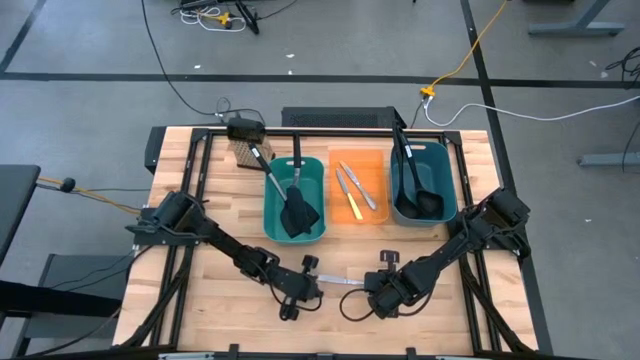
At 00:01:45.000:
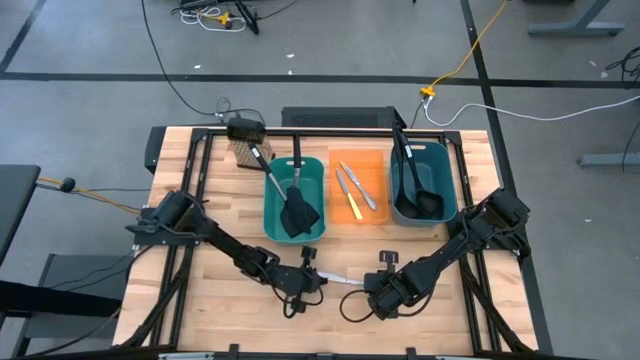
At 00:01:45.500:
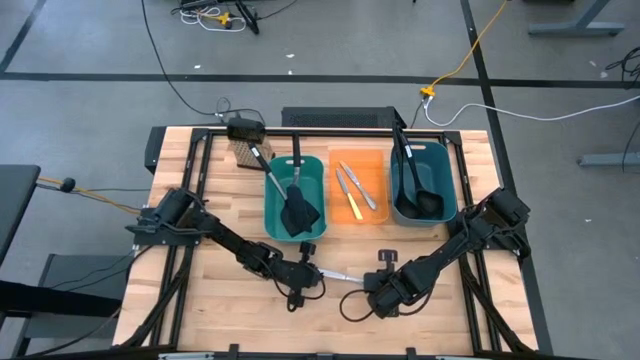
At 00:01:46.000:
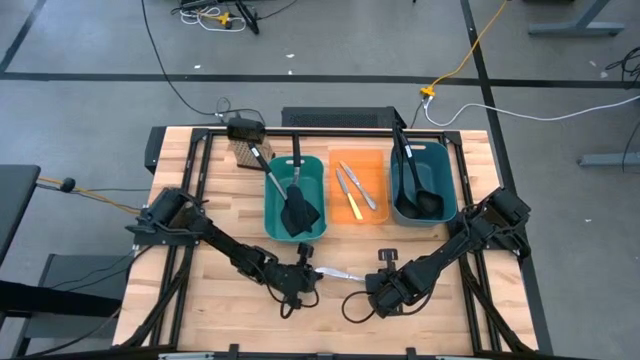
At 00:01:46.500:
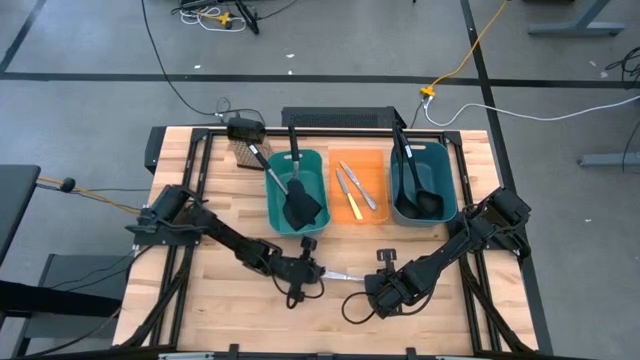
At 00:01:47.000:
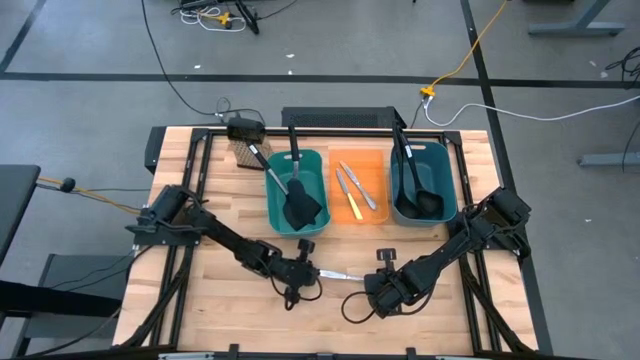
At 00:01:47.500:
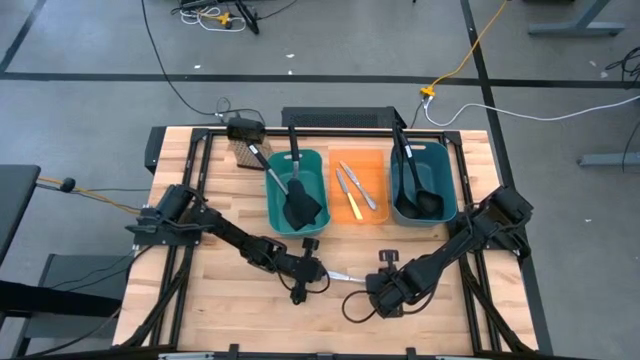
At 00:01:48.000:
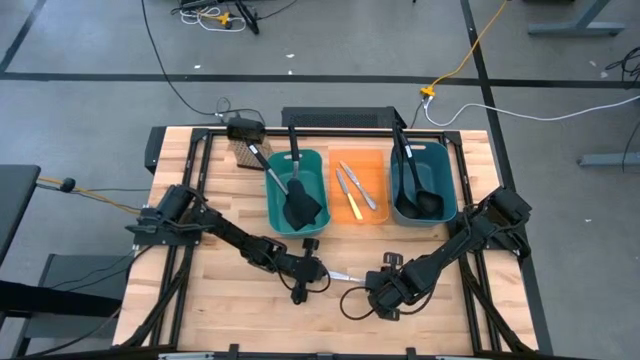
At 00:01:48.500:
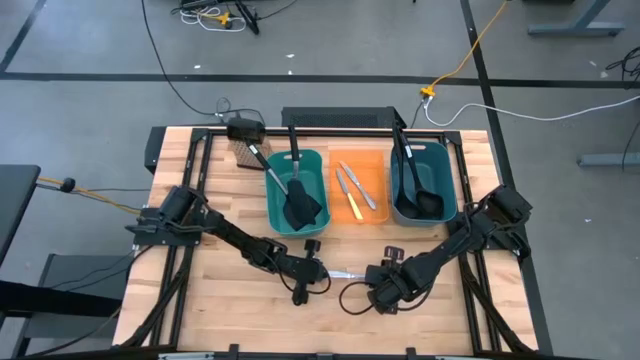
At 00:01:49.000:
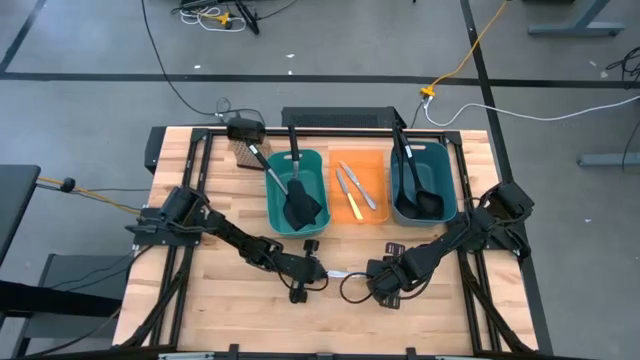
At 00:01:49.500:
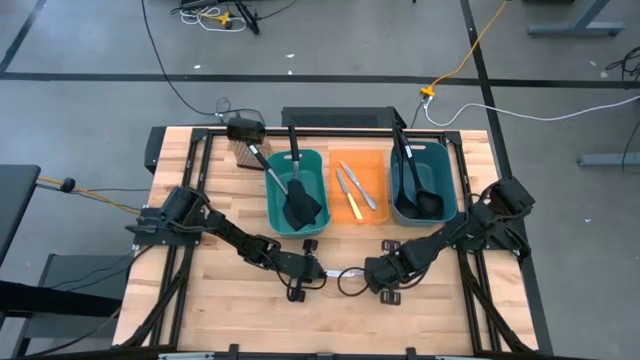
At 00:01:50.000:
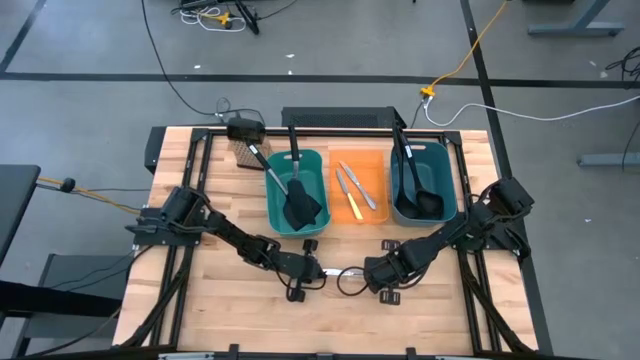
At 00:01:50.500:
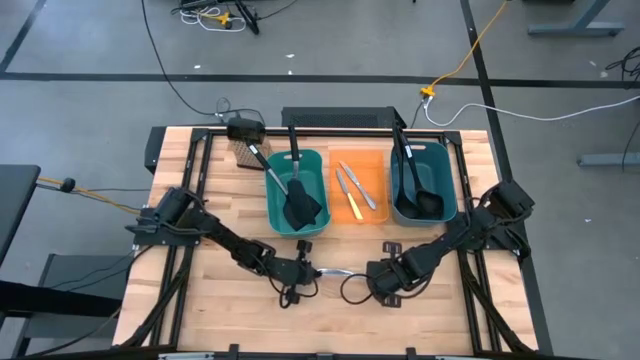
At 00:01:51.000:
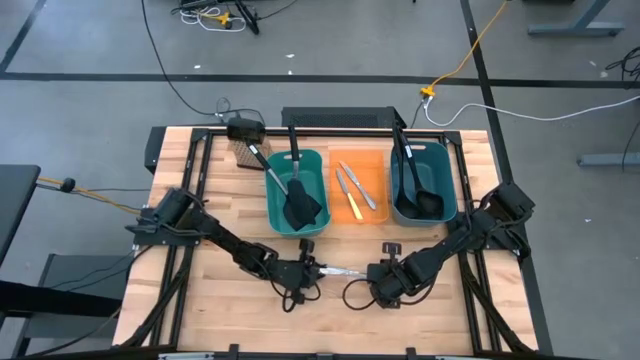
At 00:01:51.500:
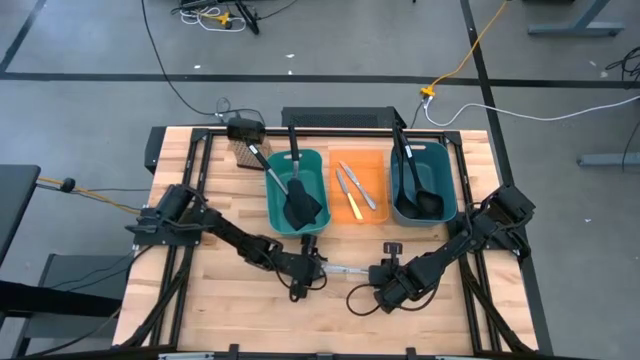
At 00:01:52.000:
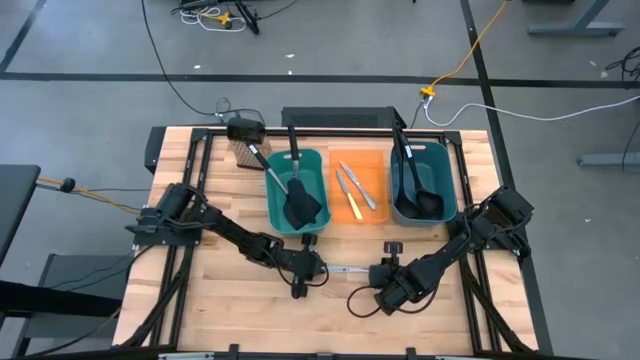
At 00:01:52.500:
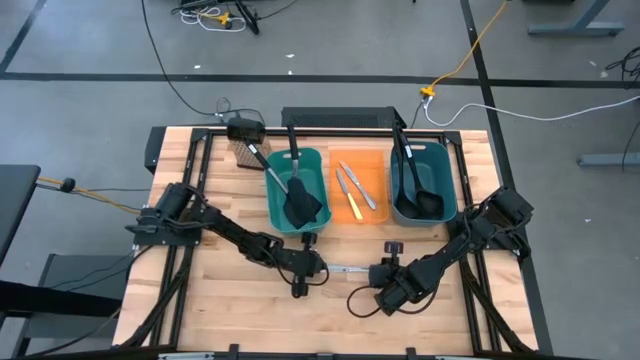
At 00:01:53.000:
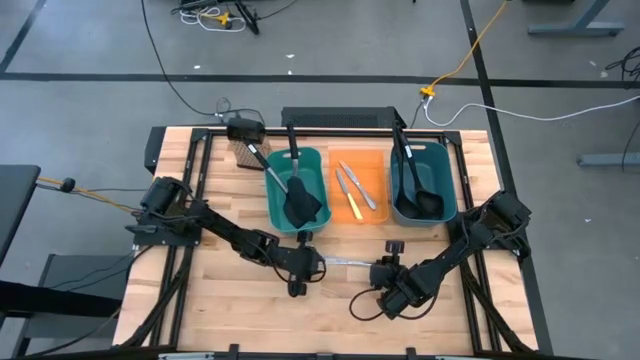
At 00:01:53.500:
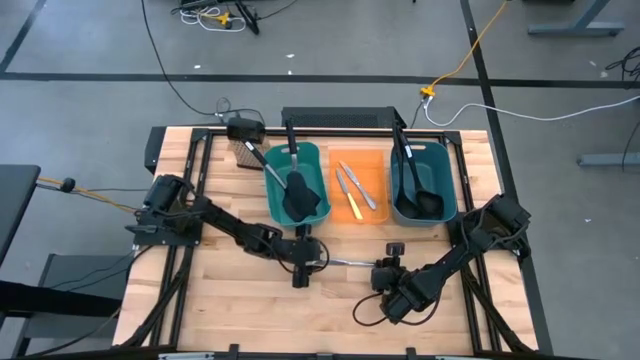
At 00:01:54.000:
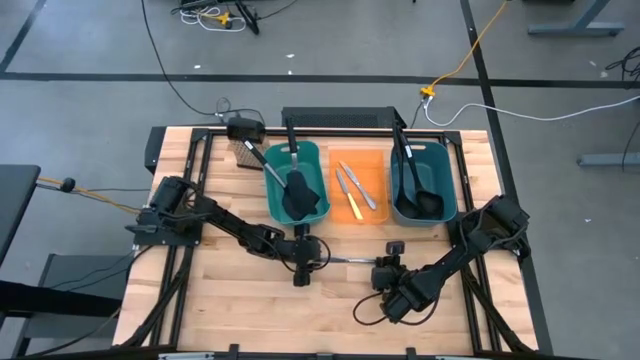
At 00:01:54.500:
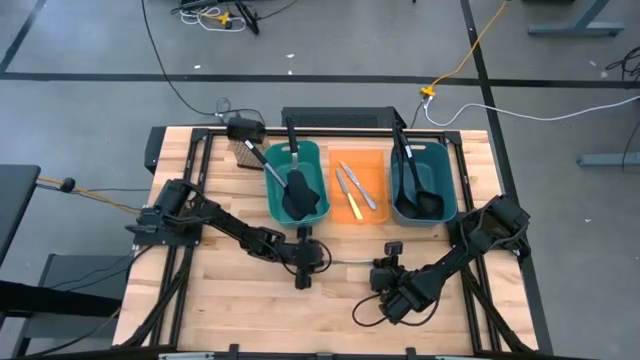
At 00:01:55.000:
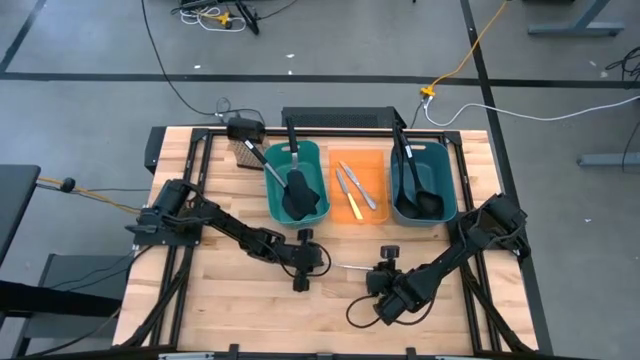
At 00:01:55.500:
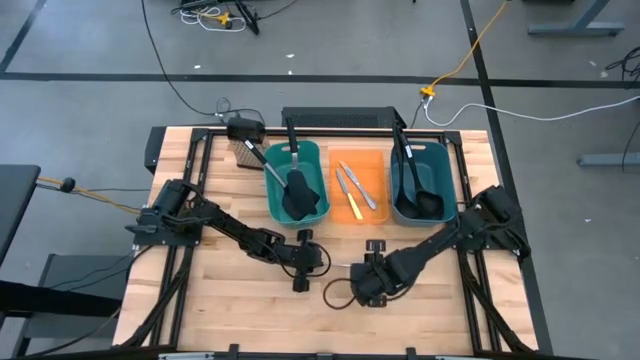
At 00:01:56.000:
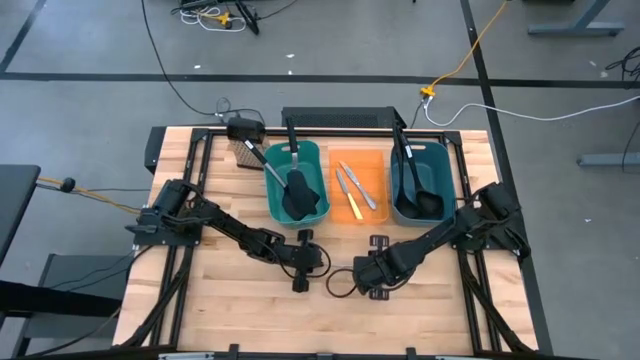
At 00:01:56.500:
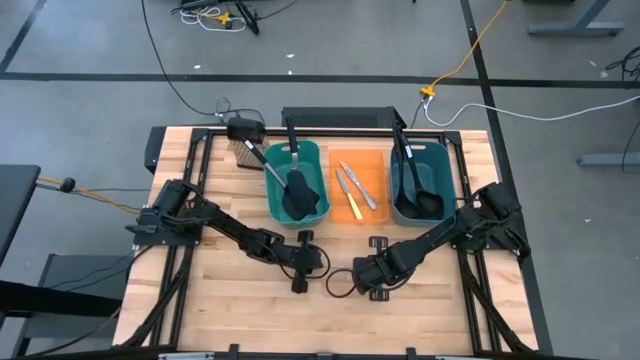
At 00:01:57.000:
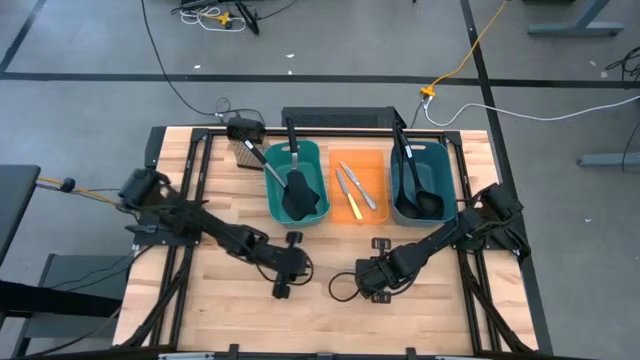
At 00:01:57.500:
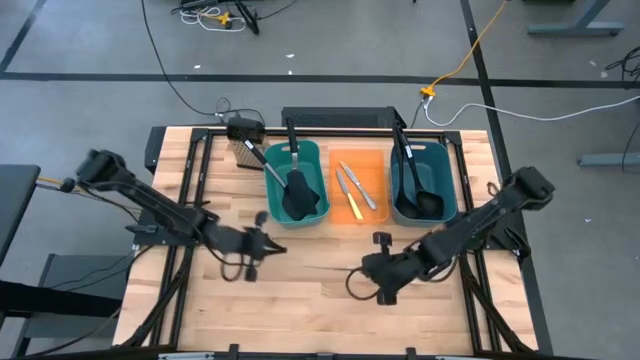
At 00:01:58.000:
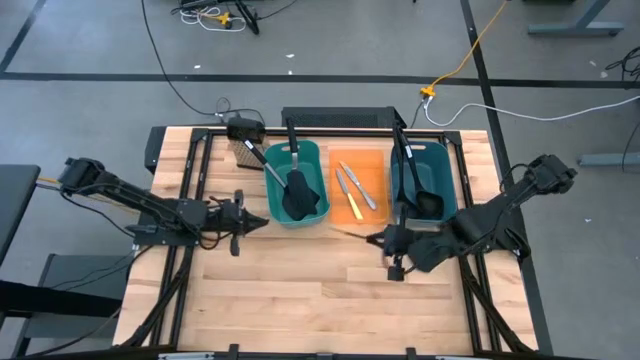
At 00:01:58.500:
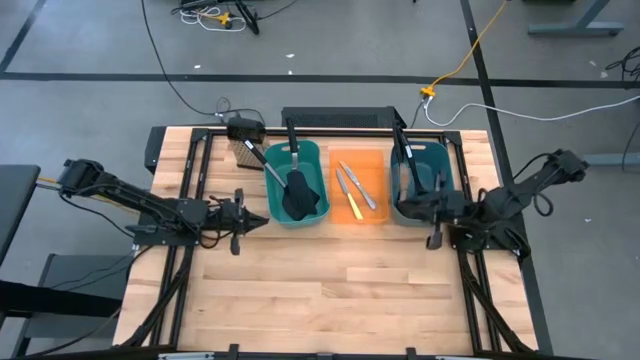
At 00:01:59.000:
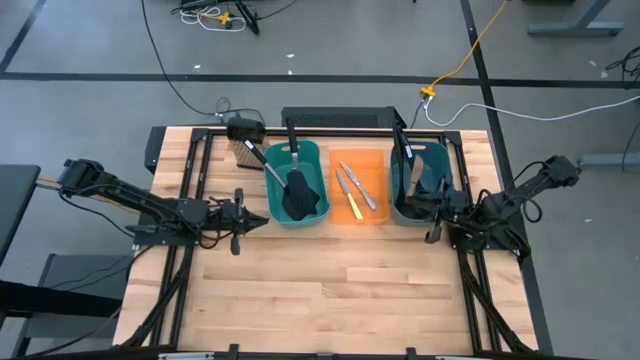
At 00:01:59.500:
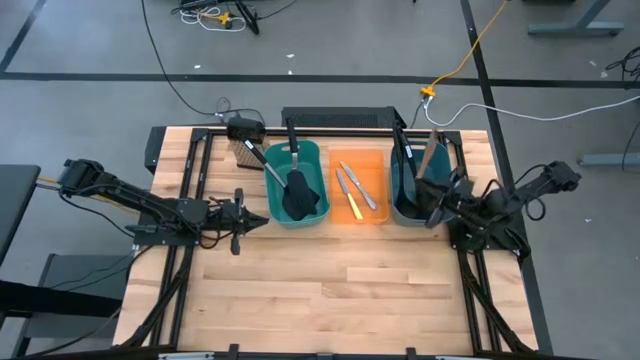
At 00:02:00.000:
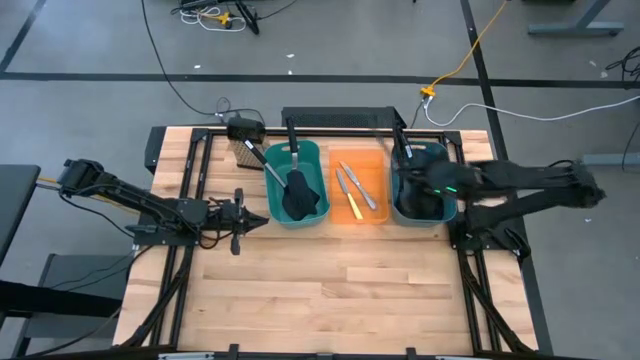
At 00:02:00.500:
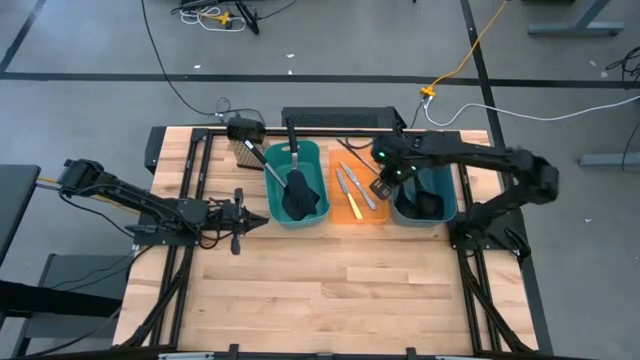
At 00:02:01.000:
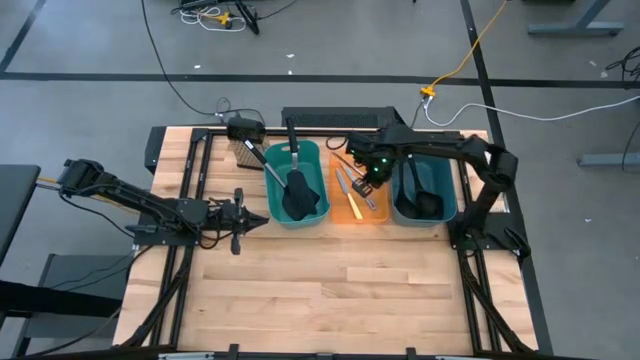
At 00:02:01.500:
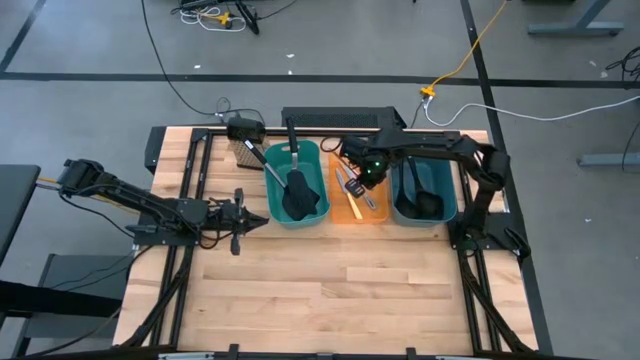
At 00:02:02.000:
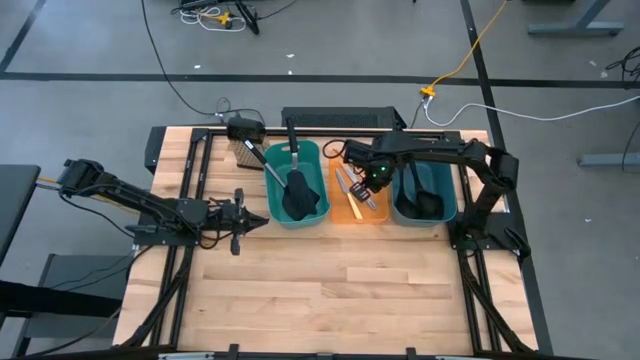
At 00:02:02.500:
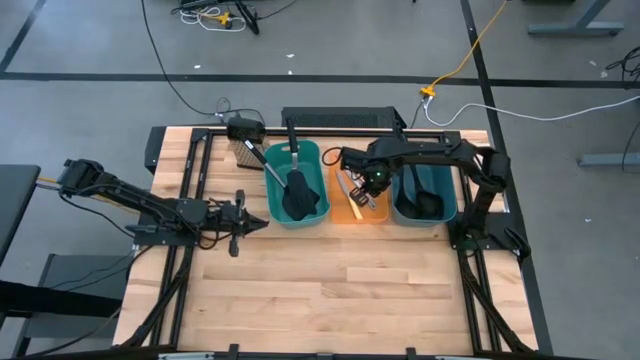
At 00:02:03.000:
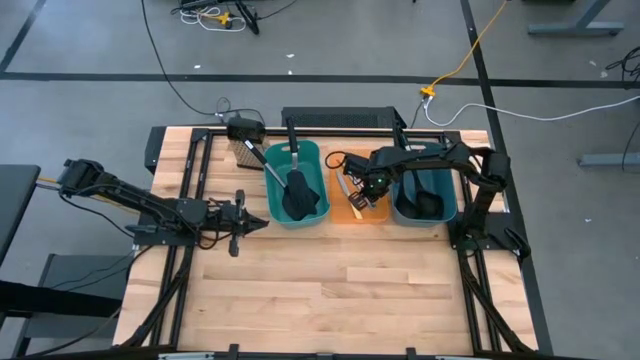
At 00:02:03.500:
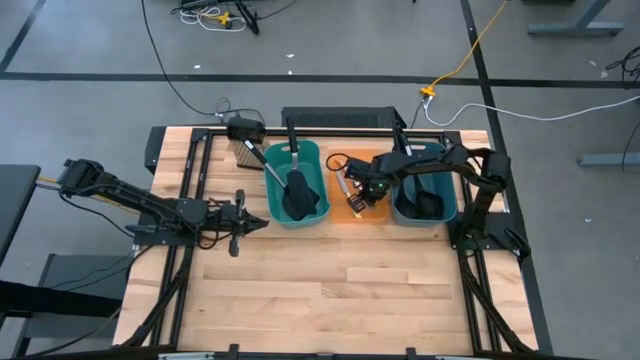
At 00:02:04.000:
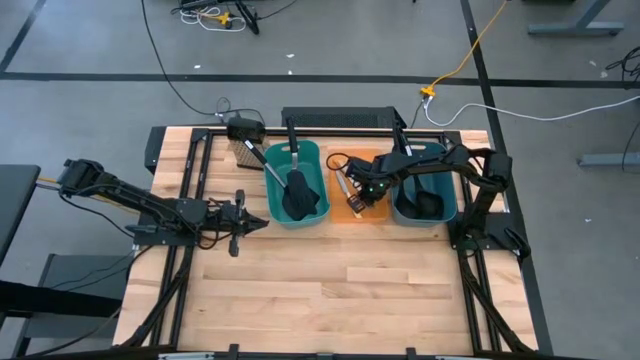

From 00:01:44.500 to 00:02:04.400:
Task: Pick & Place Kitchen Items
Put the silver table knife into the orange bin

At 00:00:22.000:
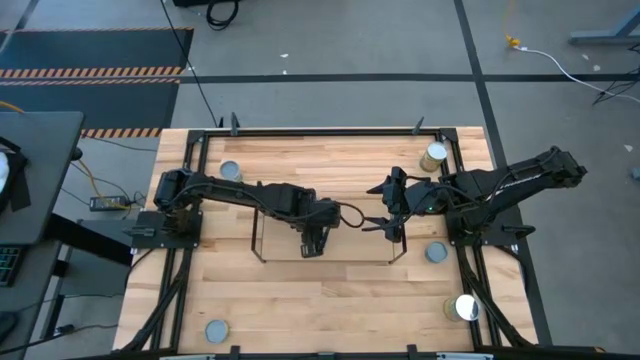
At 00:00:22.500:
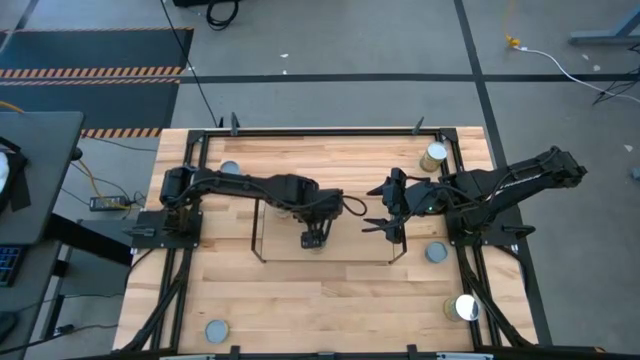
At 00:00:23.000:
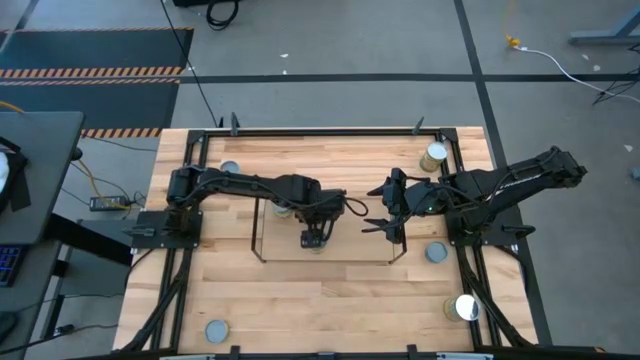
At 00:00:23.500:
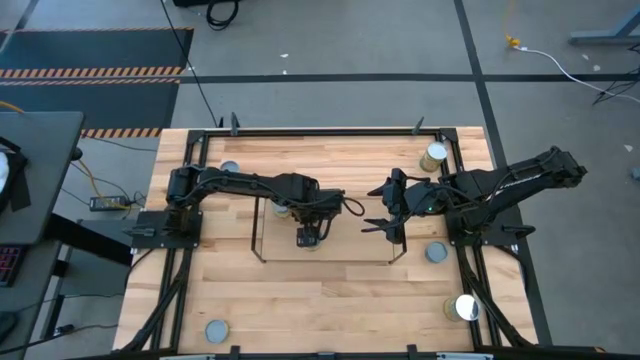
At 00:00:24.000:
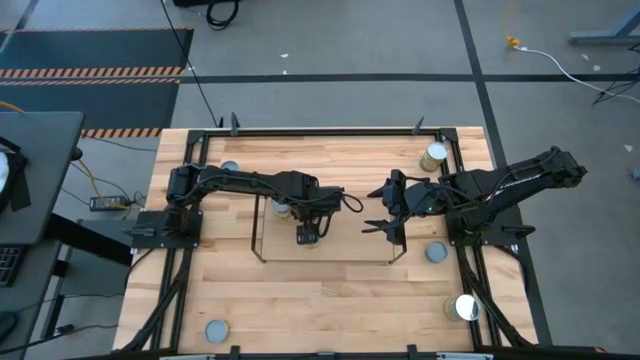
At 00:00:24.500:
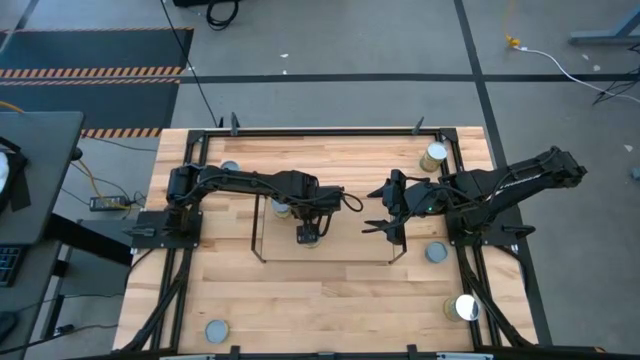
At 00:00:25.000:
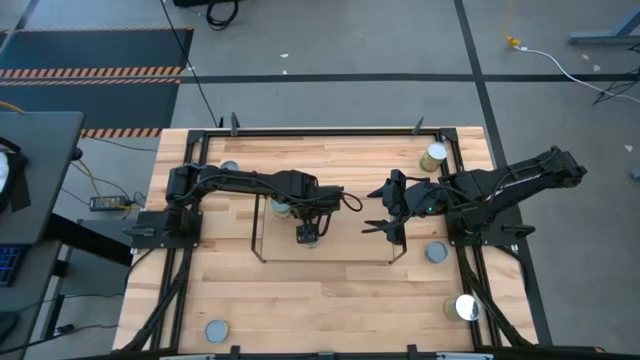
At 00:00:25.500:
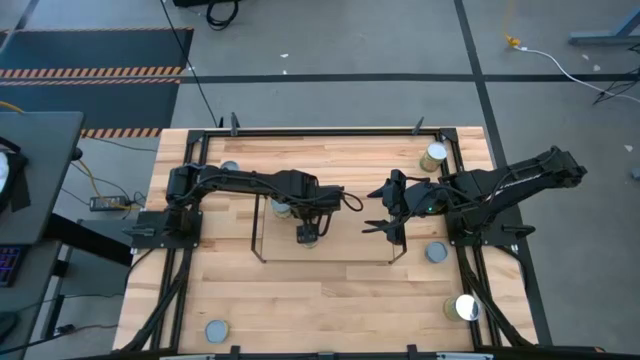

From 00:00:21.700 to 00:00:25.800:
Task: Pick and place cans onto a shelf
Adjust the dark green can and the red can on the shelf
